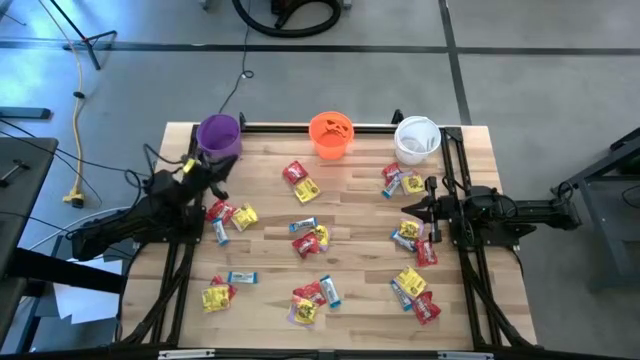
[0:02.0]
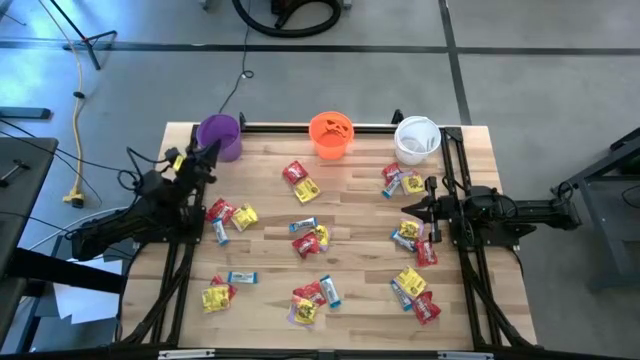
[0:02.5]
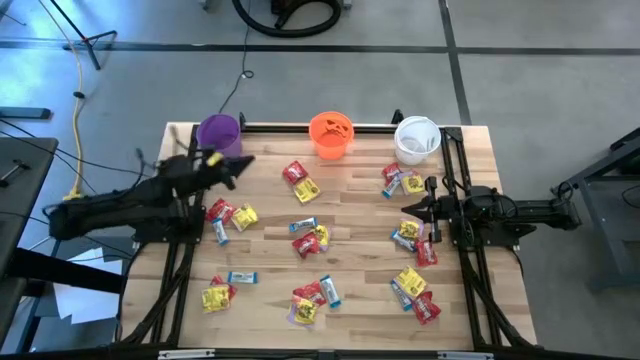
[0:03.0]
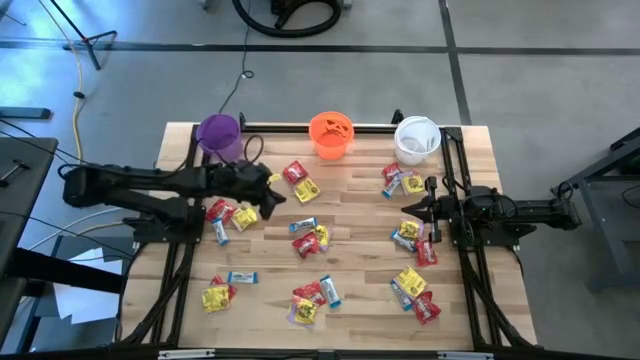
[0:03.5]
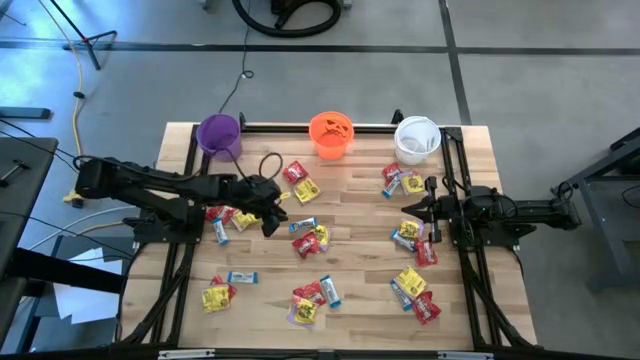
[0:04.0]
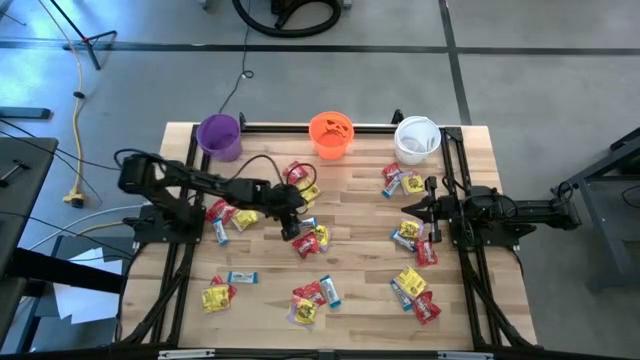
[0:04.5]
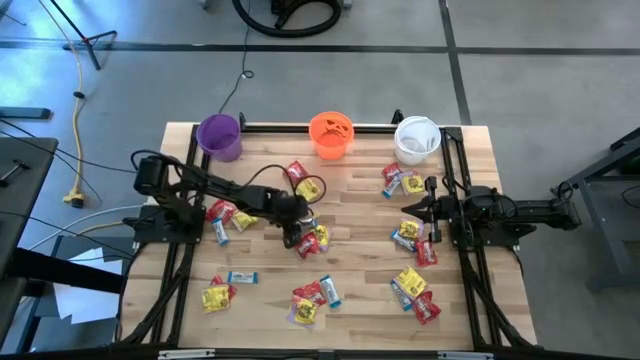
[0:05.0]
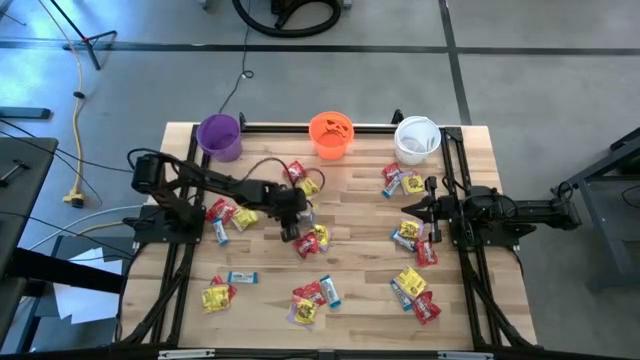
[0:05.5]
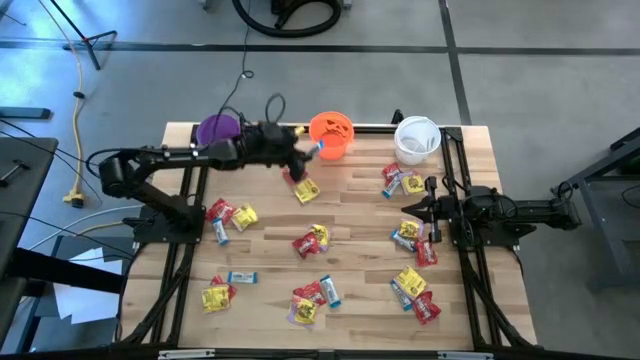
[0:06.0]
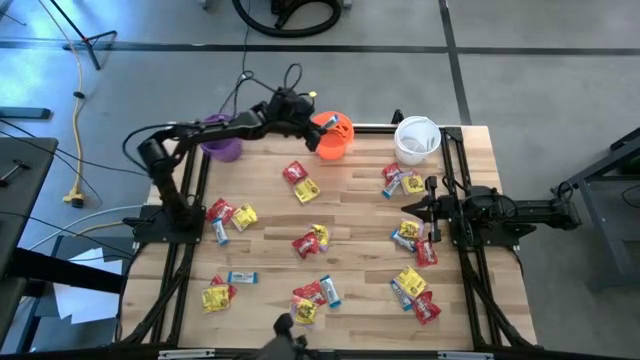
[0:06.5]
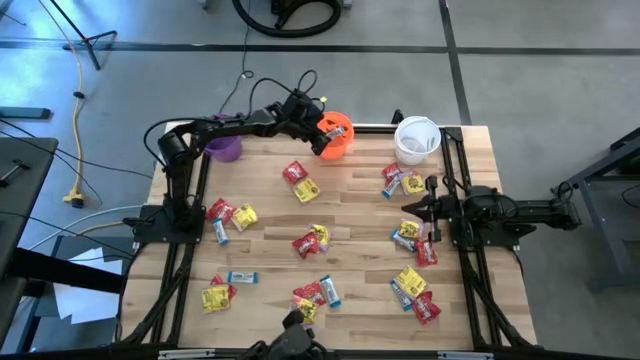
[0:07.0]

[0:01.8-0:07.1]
Task: Organize candy in baskets
Put the white chocolate into the orange bucket

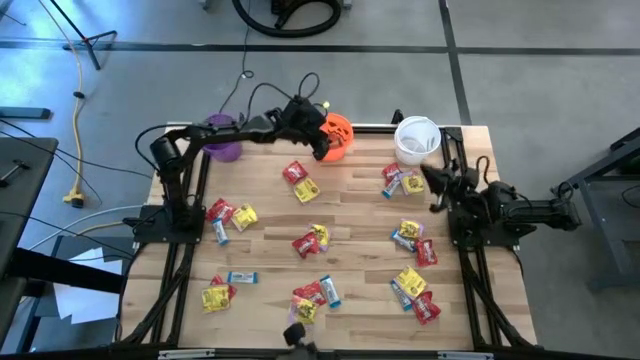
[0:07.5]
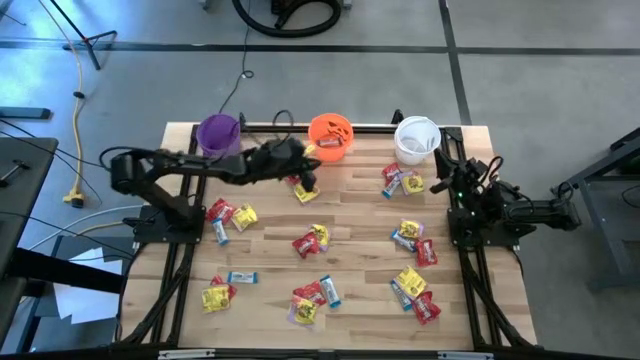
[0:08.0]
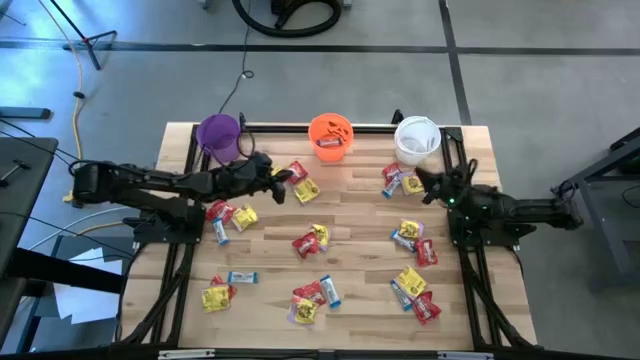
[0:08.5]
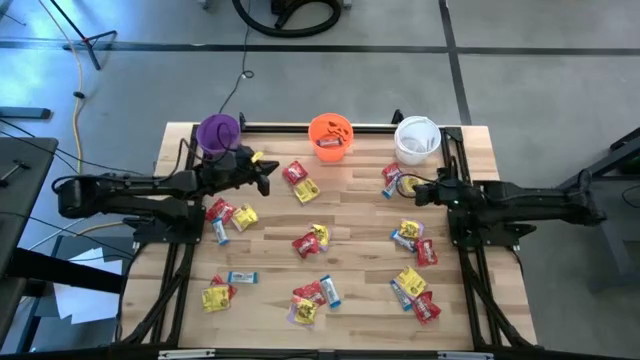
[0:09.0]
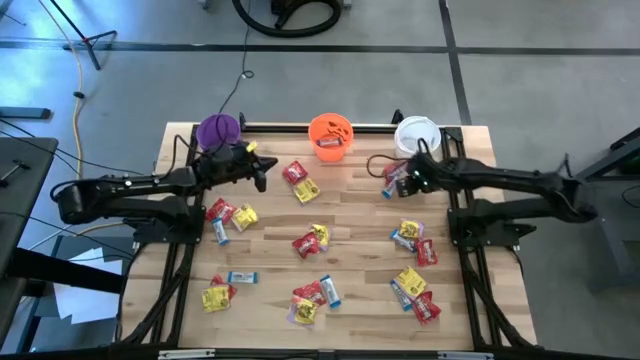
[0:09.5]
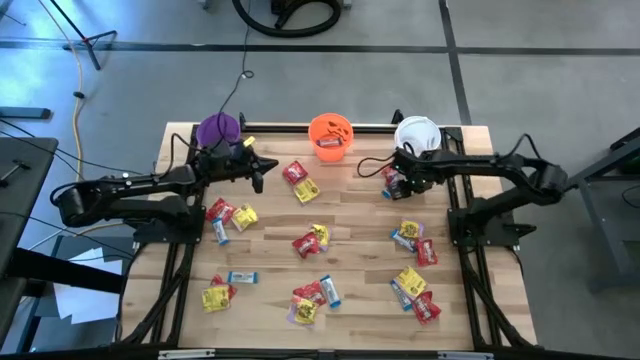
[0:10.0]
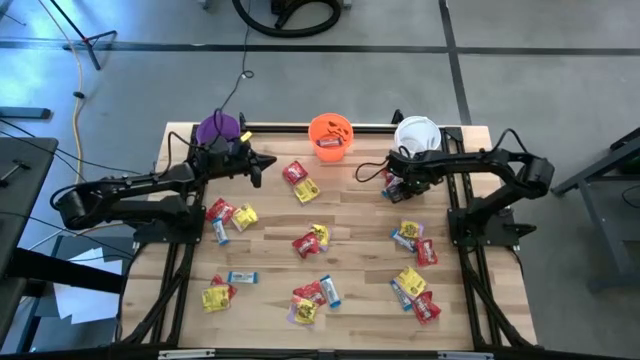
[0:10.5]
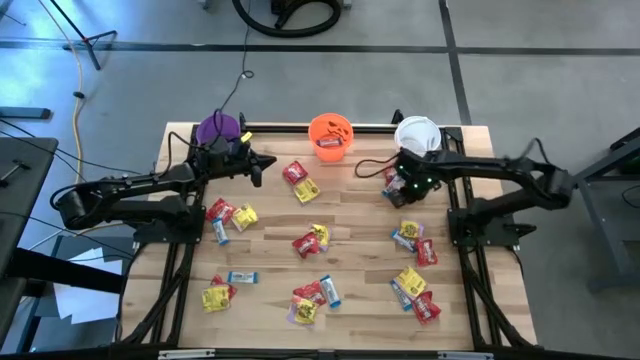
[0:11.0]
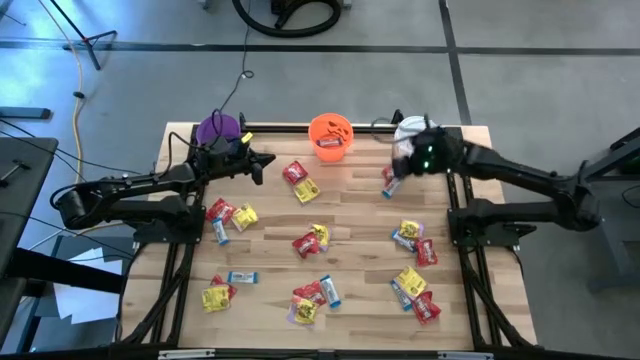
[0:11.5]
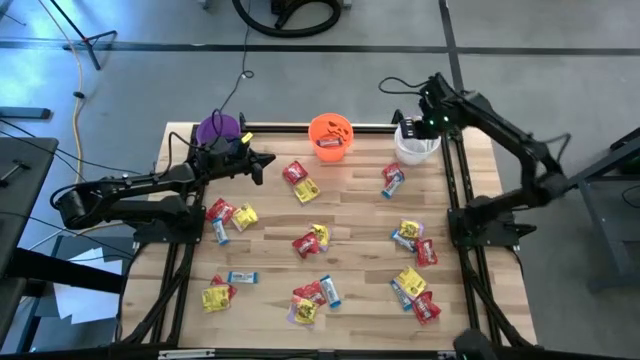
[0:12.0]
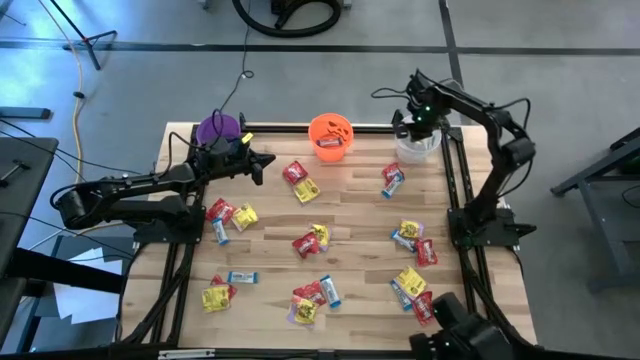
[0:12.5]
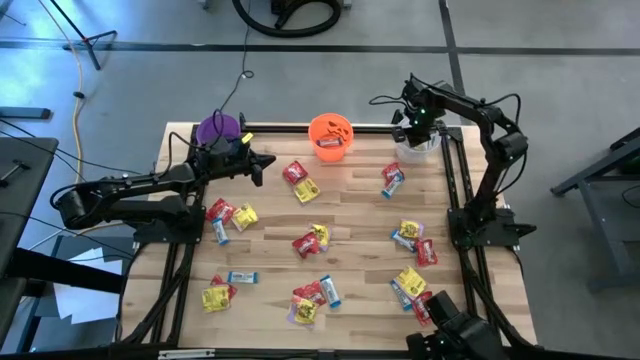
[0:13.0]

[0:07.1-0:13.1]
Put the yellow candy into the white bucket

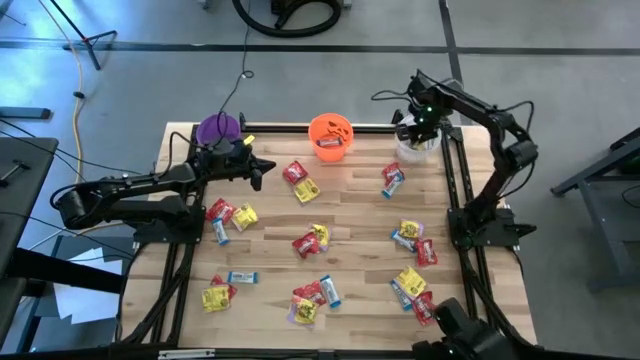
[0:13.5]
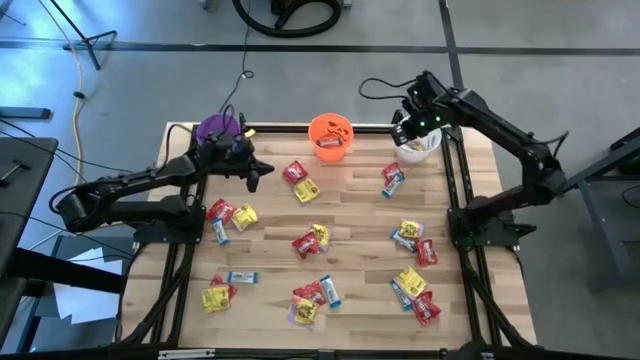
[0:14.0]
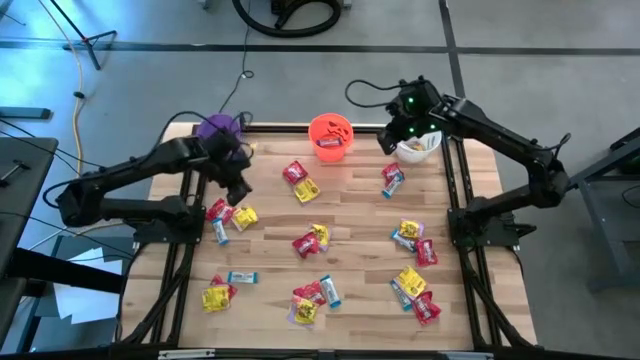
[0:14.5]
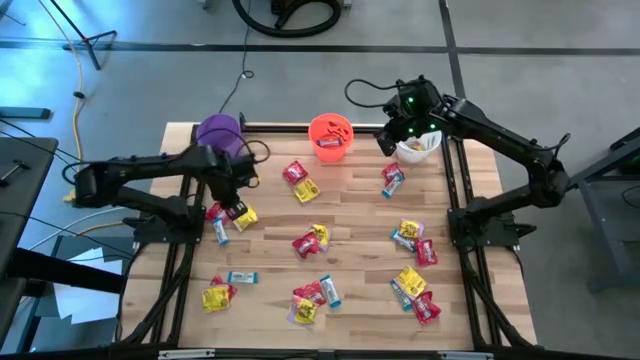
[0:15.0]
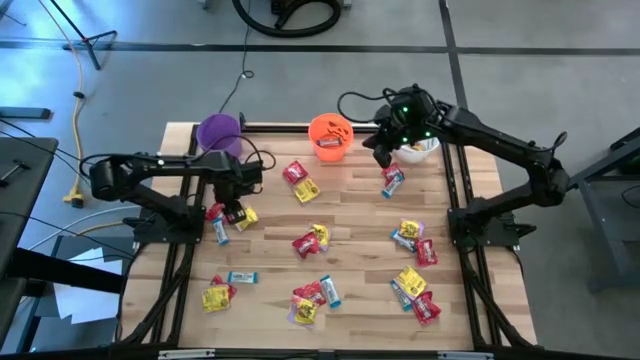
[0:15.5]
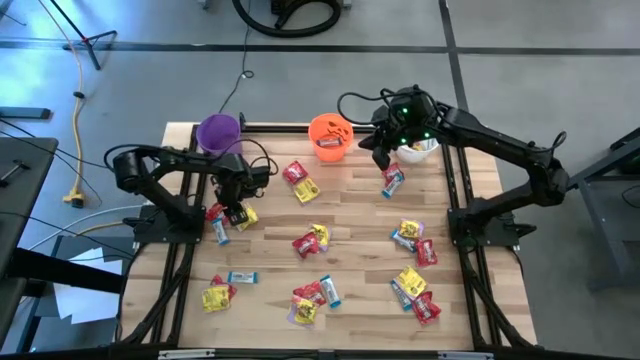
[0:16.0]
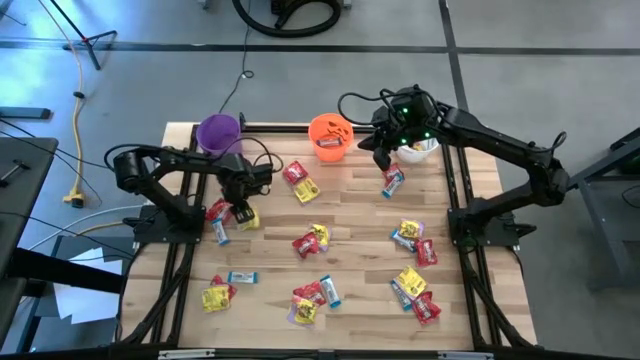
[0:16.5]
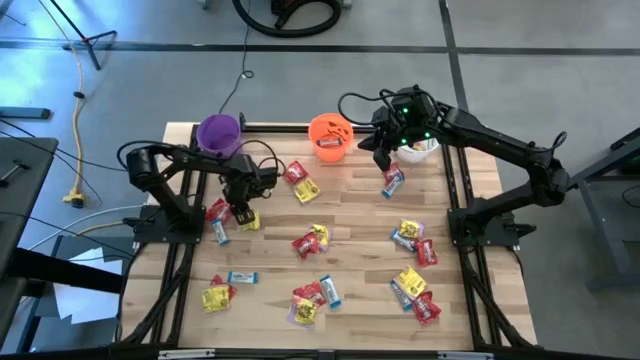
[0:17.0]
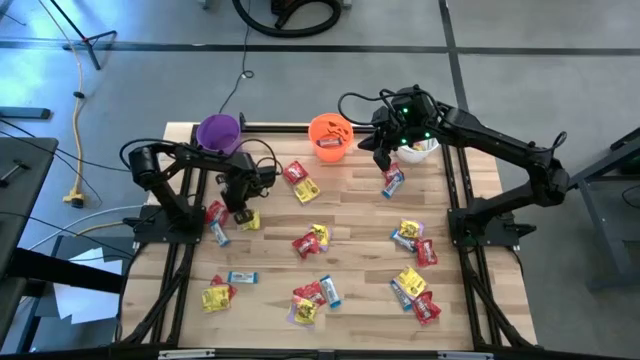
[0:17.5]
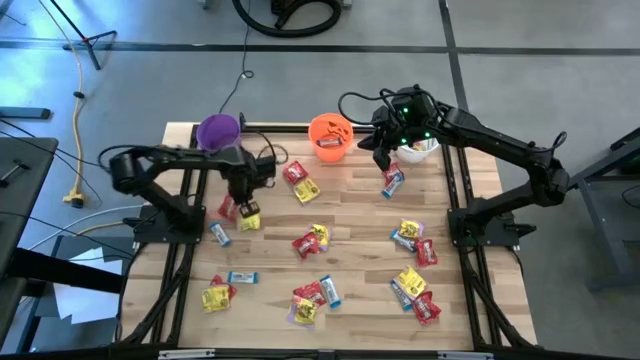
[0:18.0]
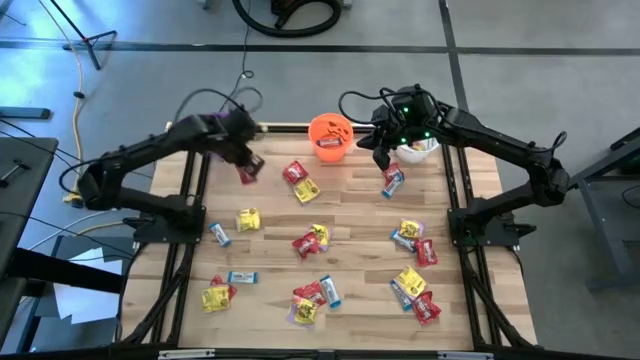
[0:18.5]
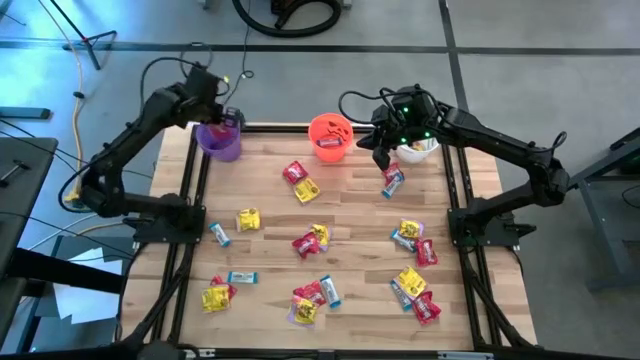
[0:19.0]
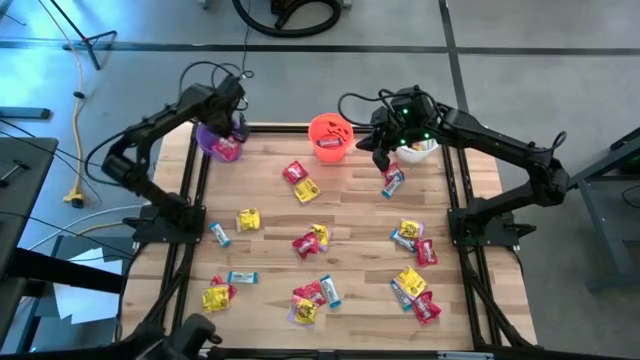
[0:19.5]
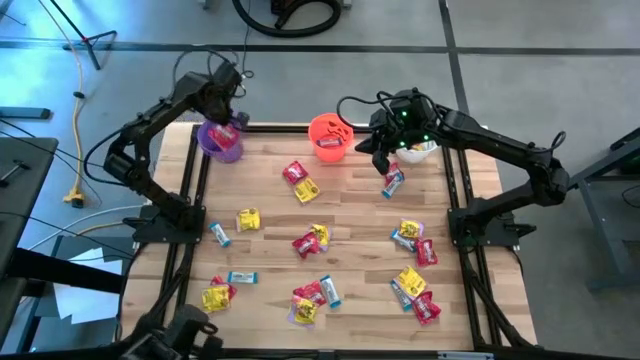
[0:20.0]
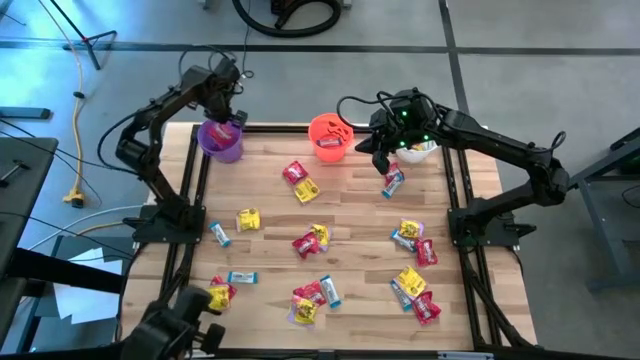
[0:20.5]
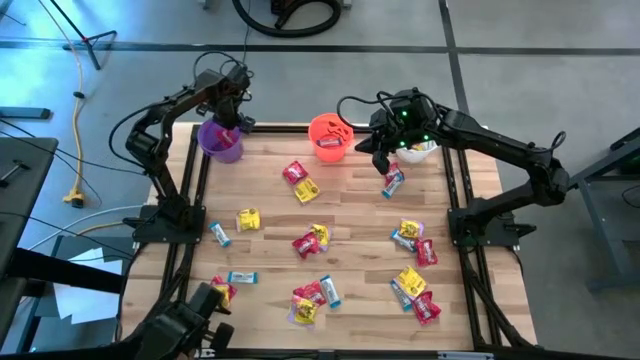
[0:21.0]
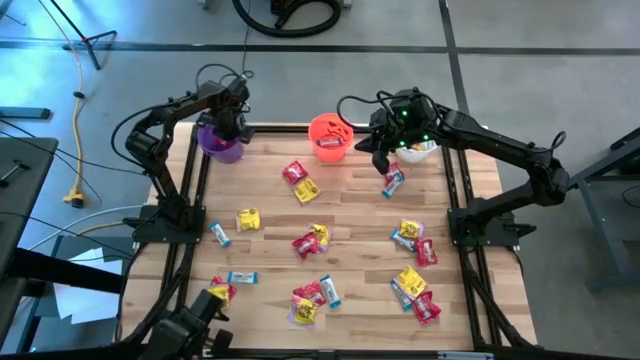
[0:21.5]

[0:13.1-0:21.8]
Put the red candy into the violet bucket

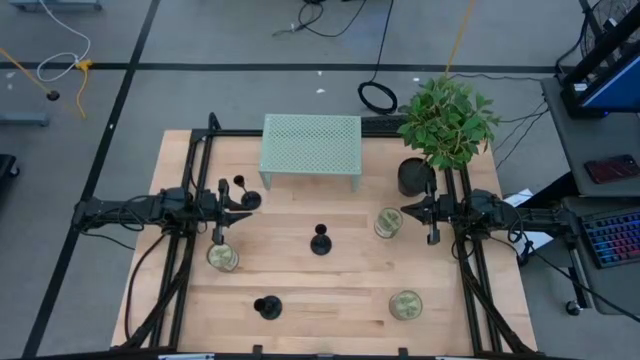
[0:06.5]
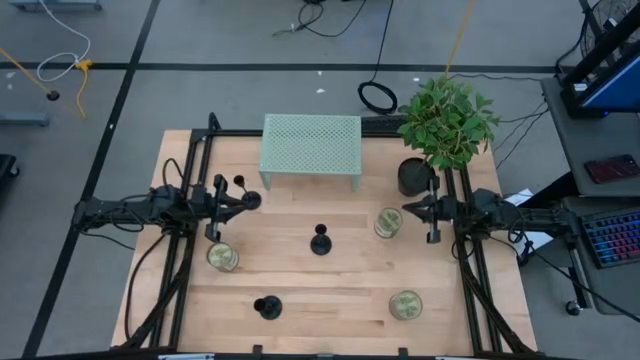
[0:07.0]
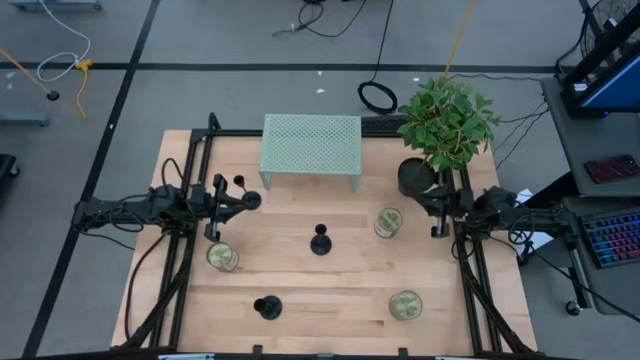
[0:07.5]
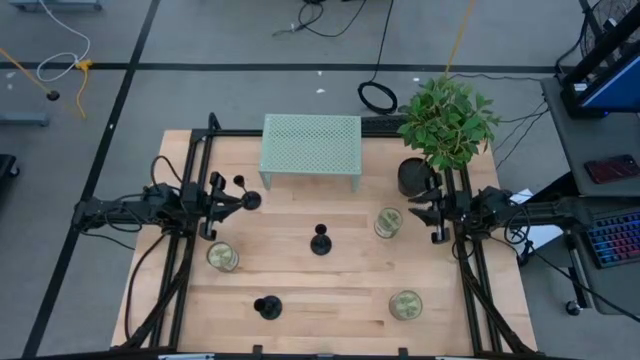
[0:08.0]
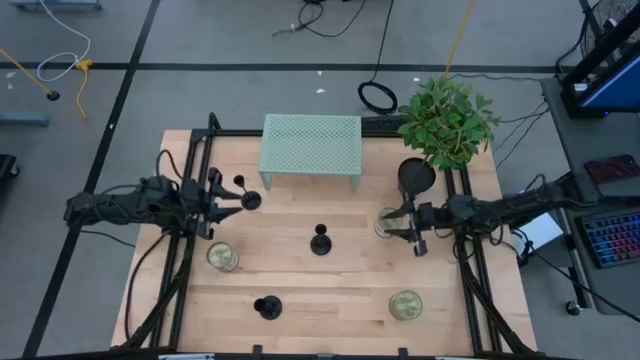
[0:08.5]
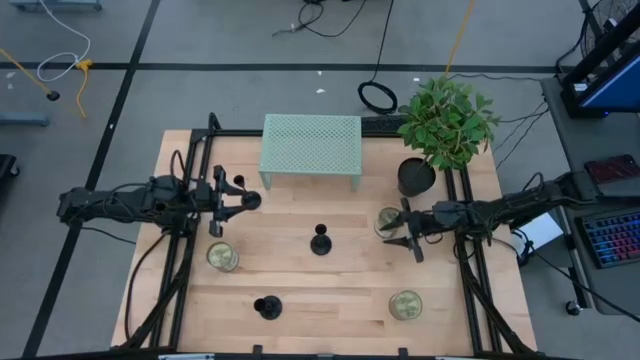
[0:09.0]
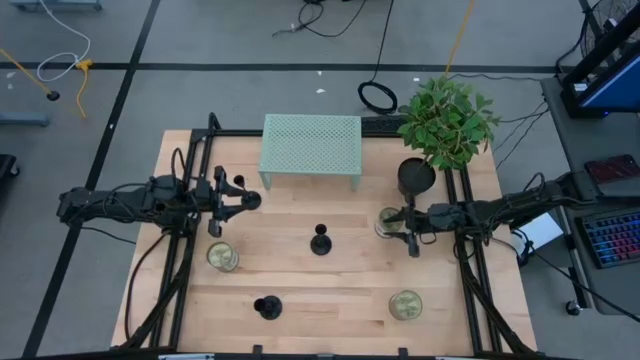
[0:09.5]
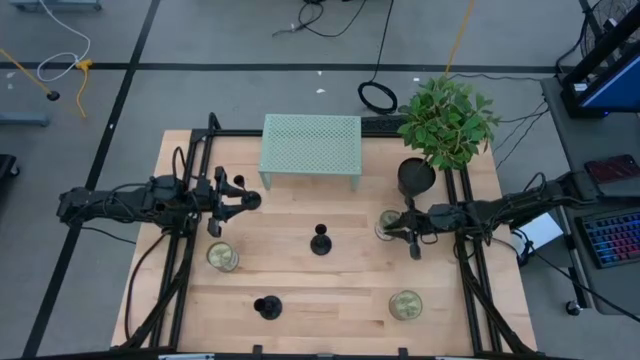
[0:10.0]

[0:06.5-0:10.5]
Task: Pick & Place candle stick holders
Put the top scented candle on the shelf
